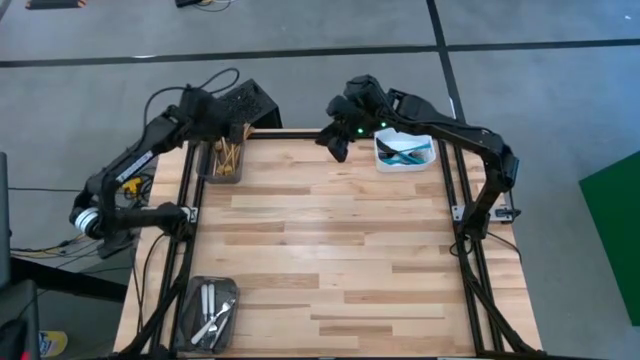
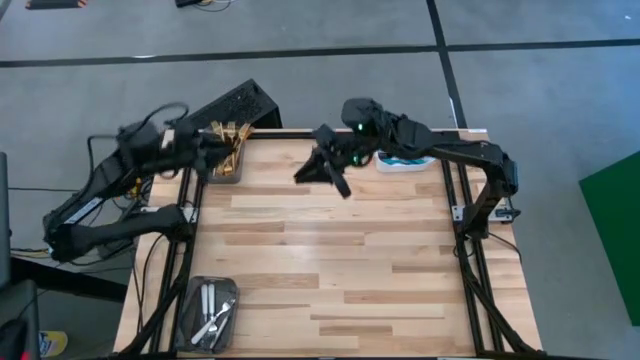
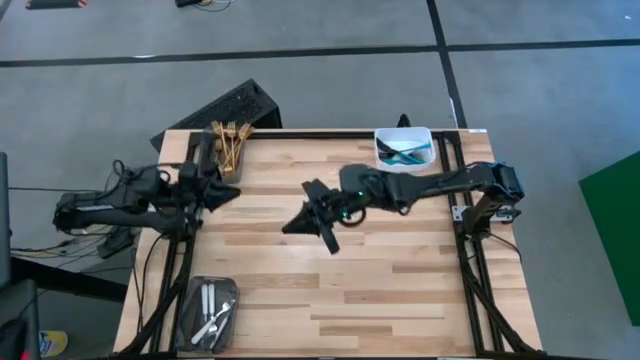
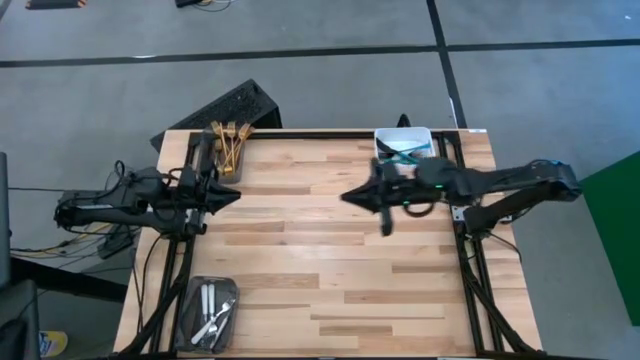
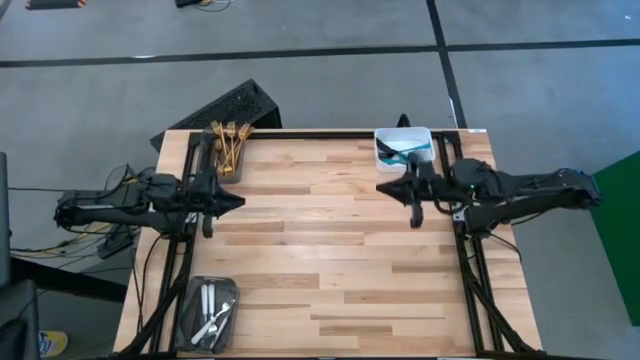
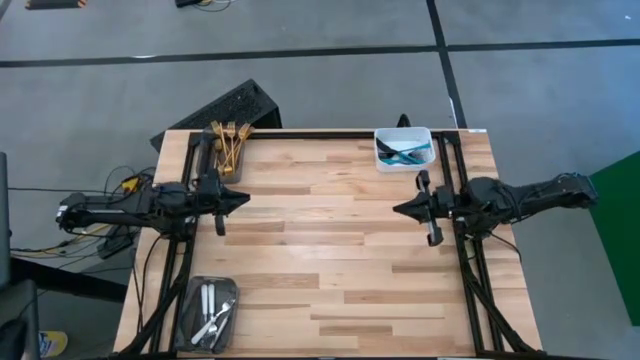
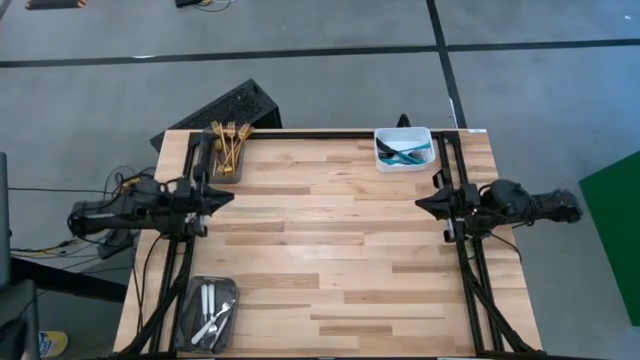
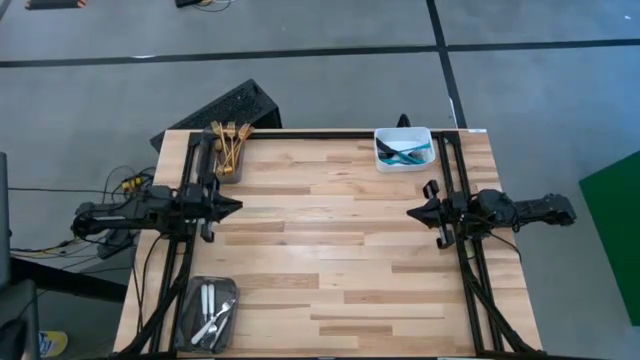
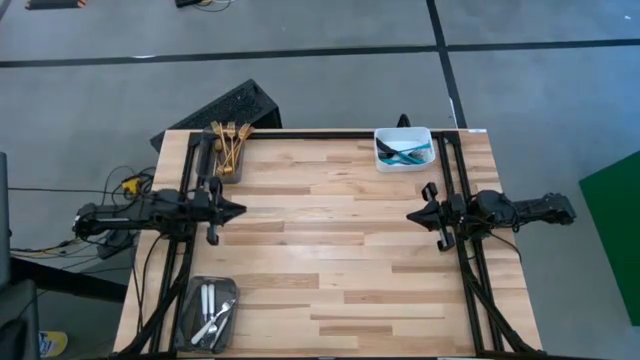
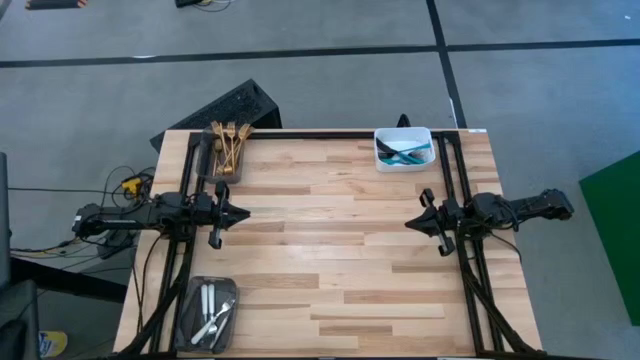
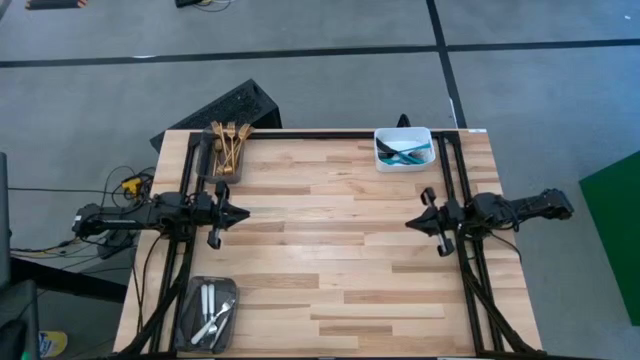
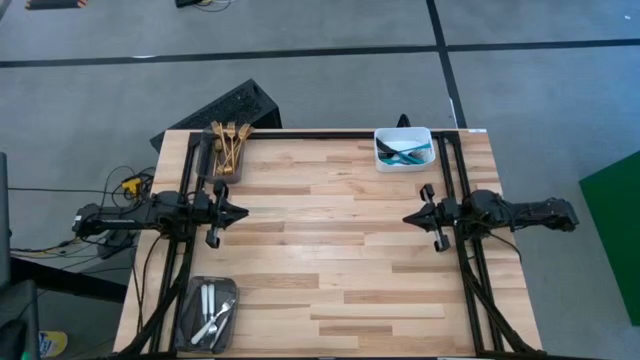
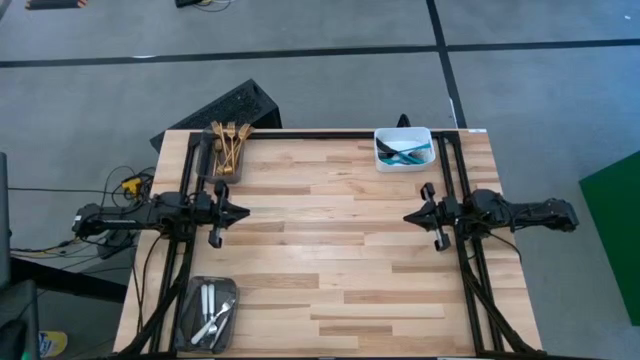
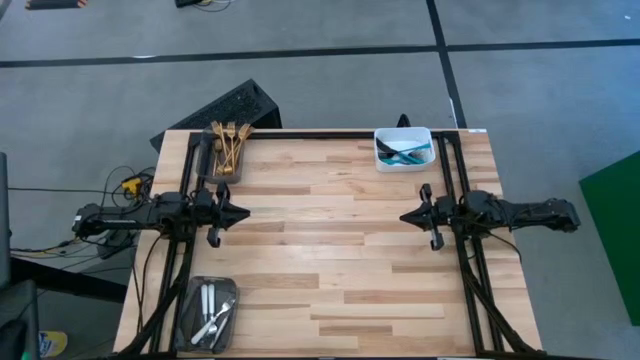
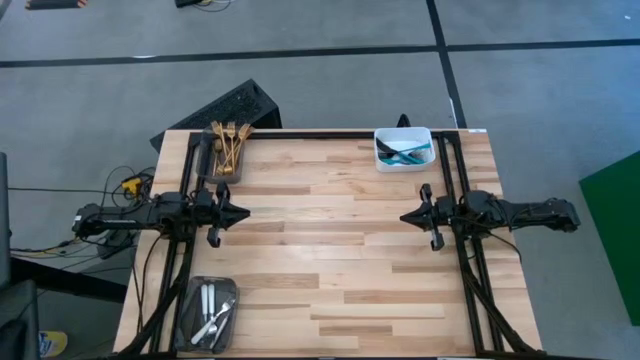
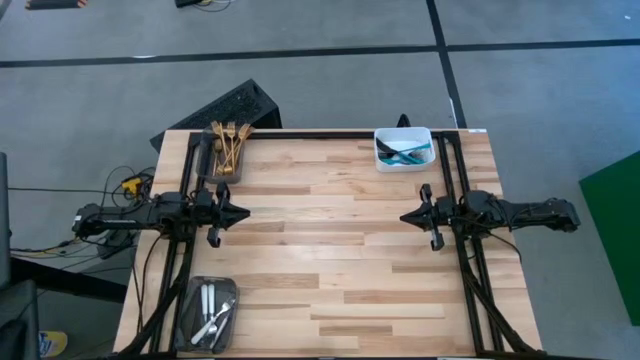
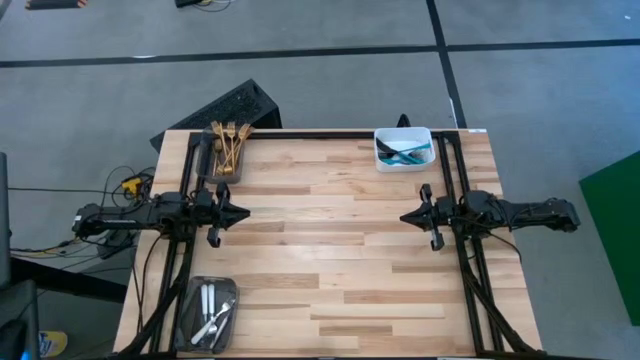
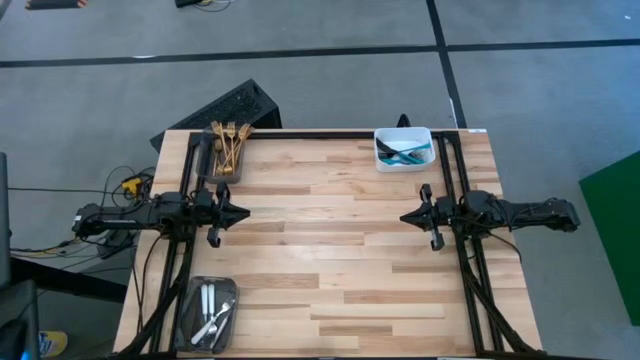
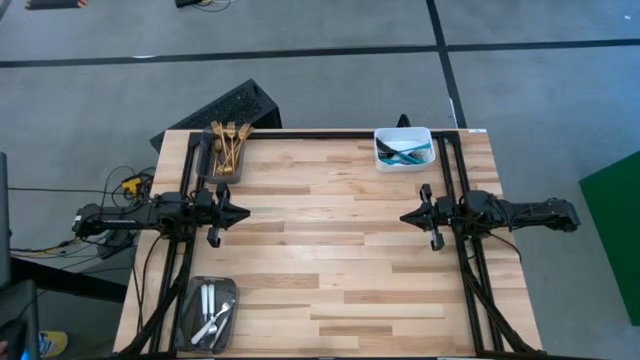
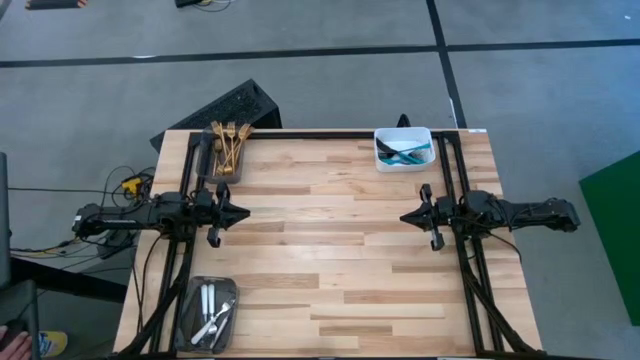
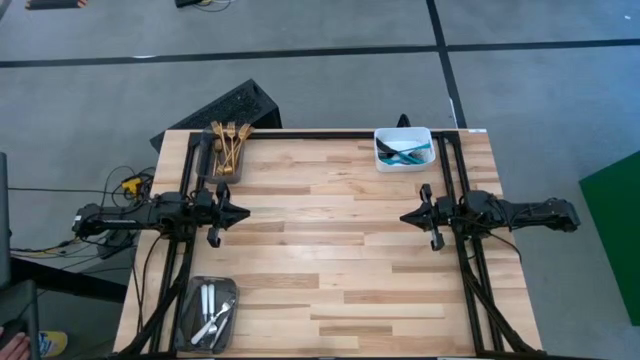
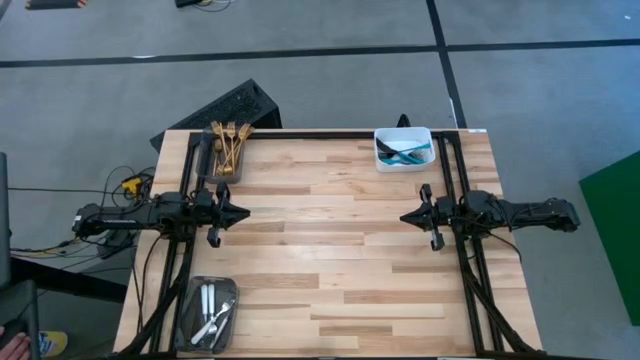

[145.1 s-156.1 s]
Task: Sort silverware by color (type)
Return to Home Position

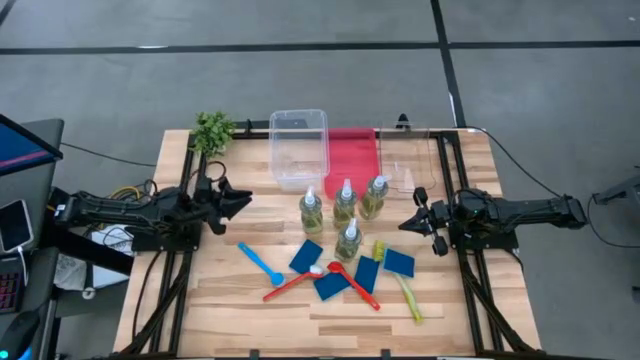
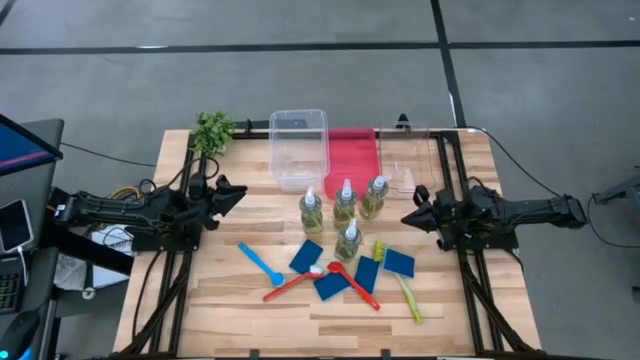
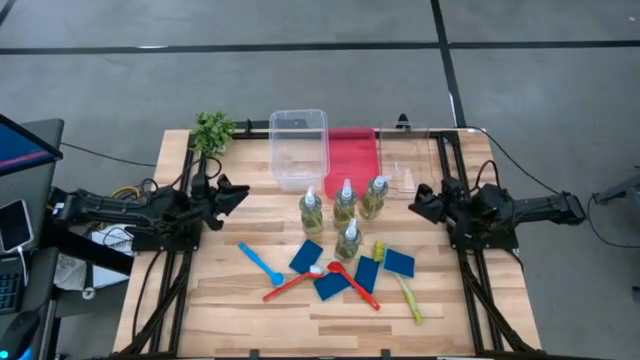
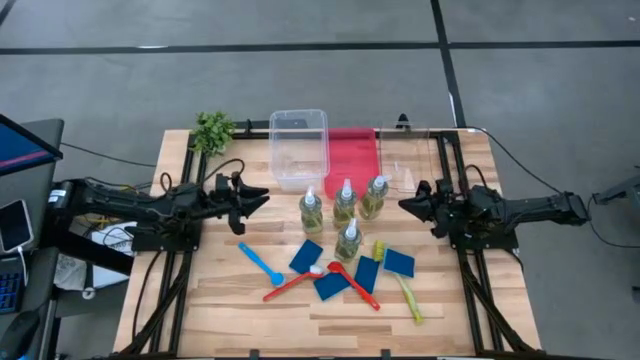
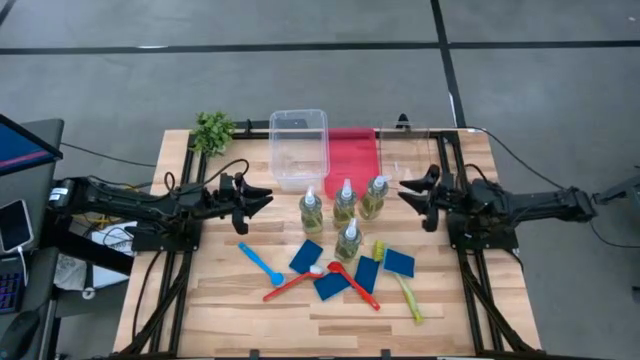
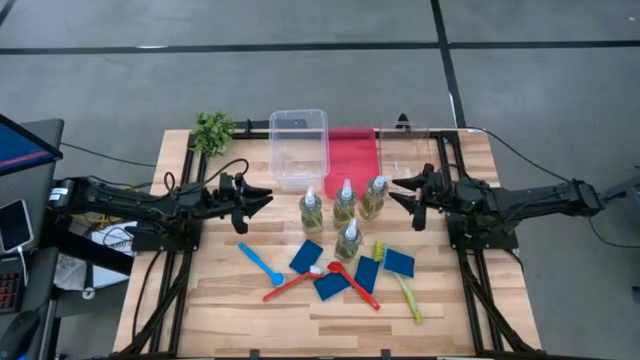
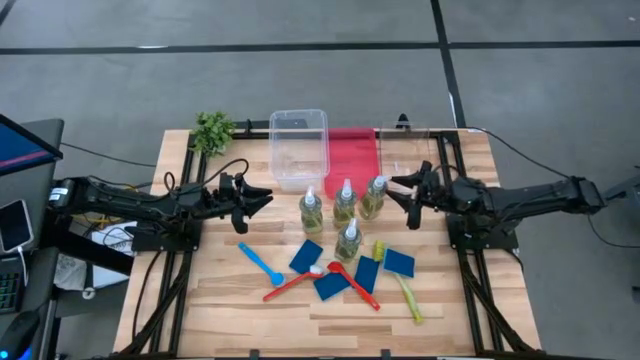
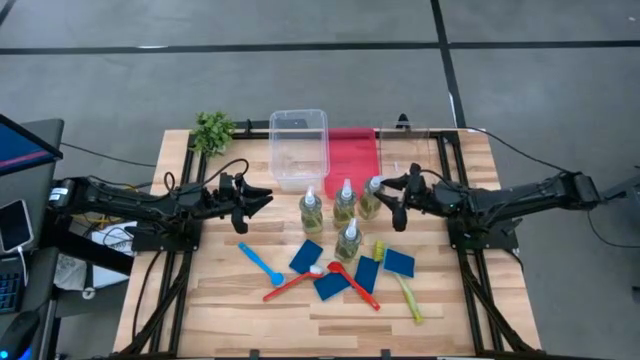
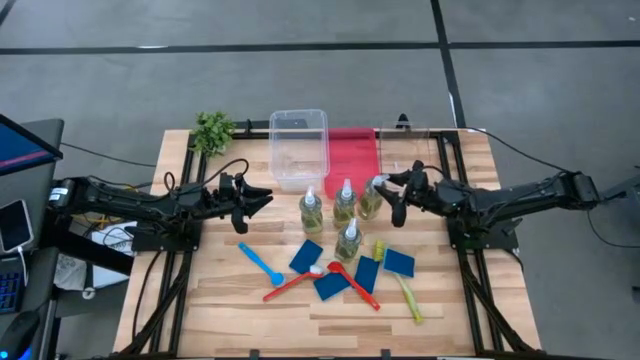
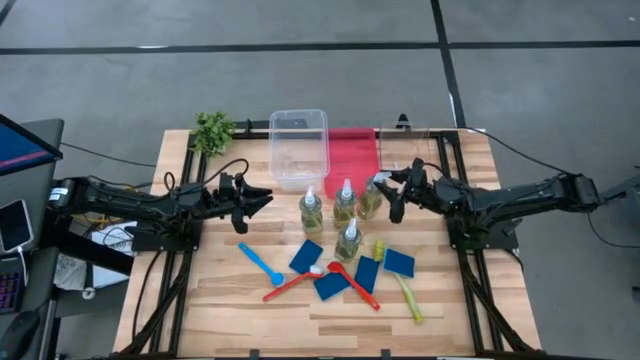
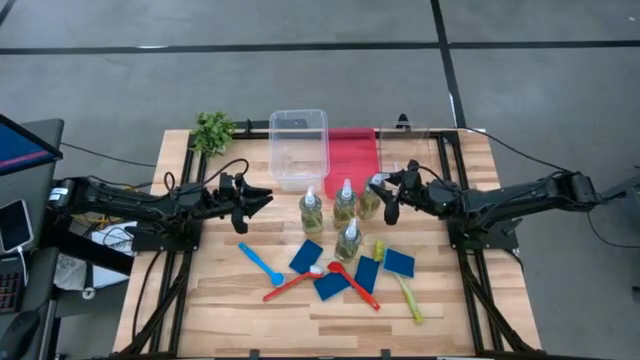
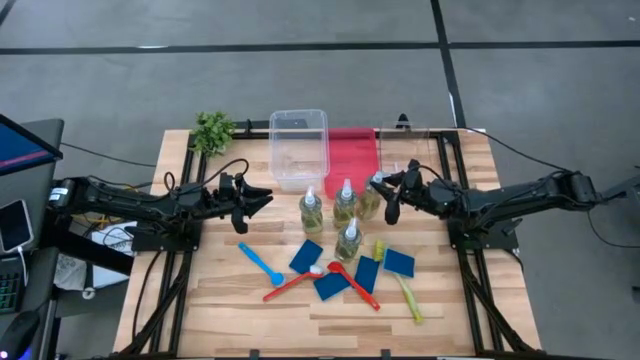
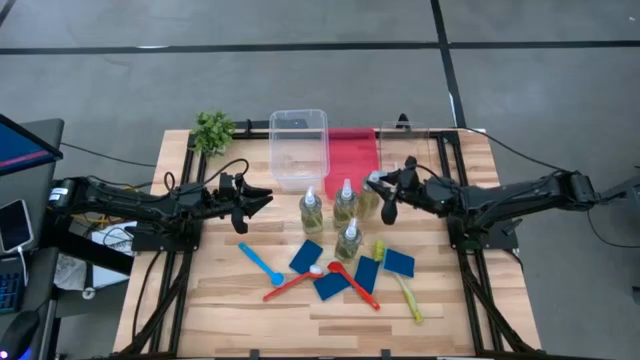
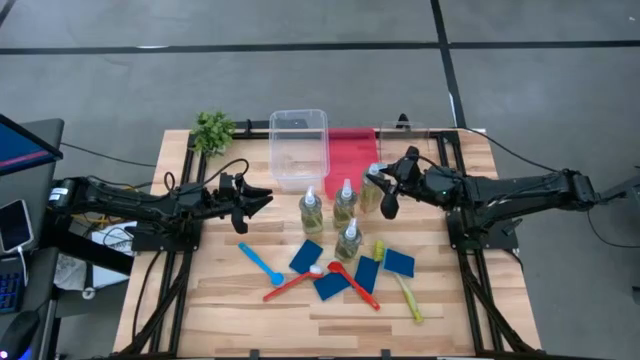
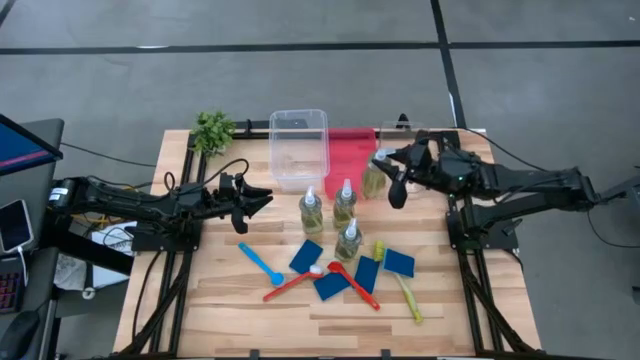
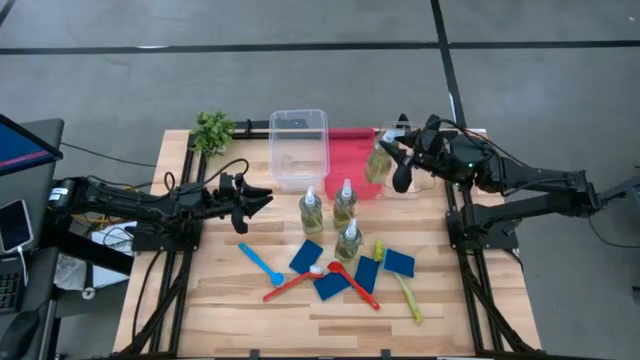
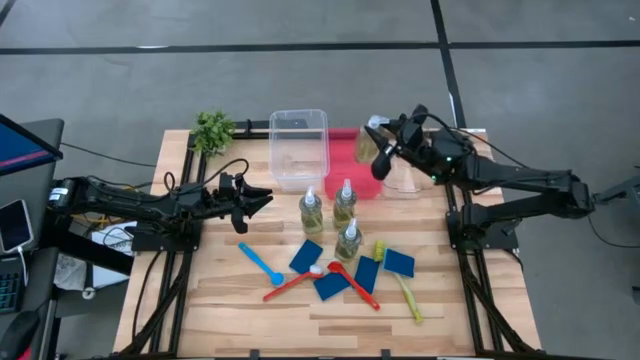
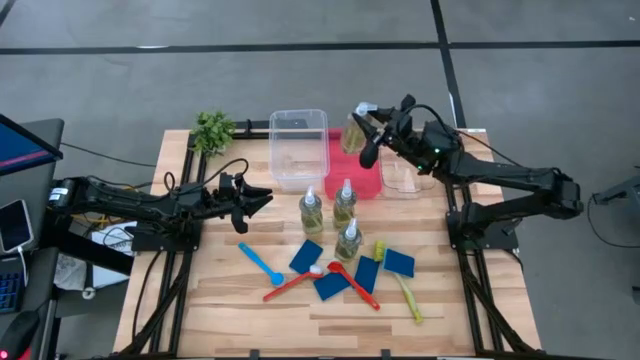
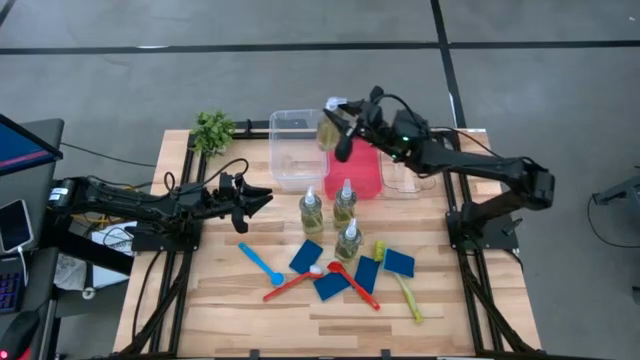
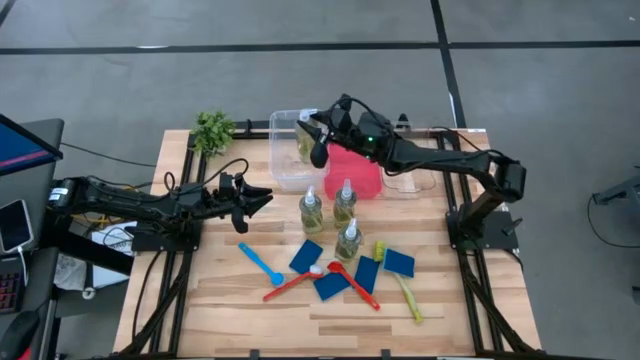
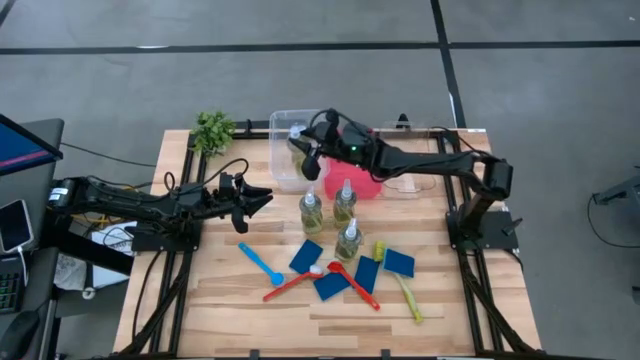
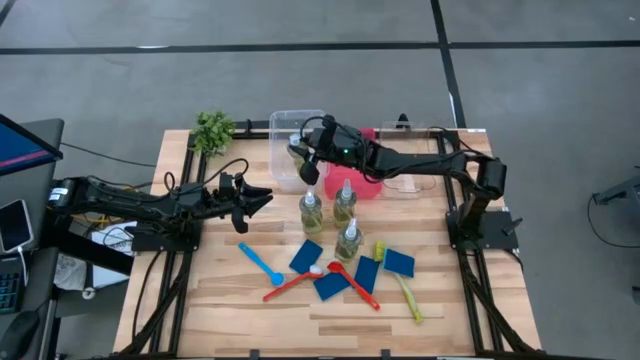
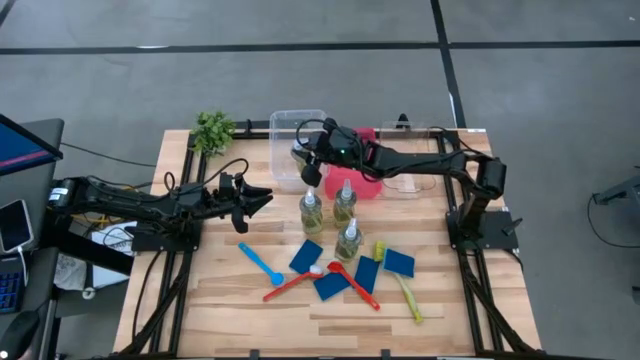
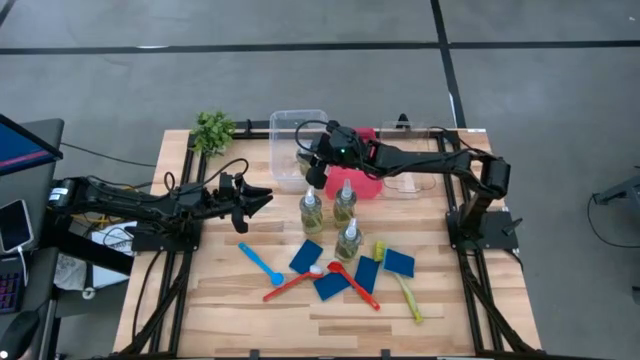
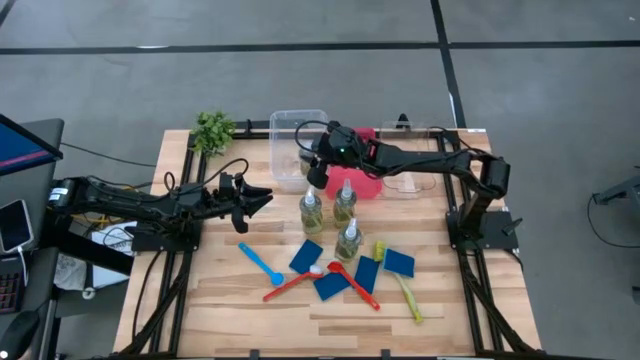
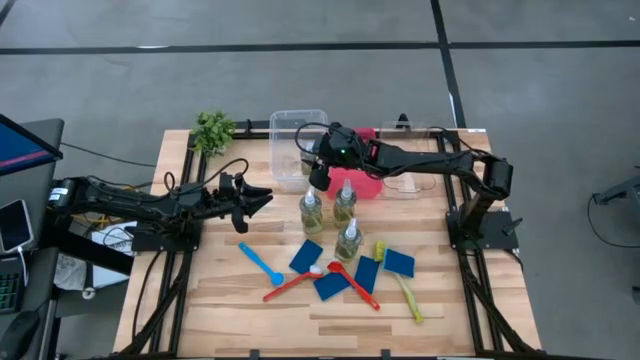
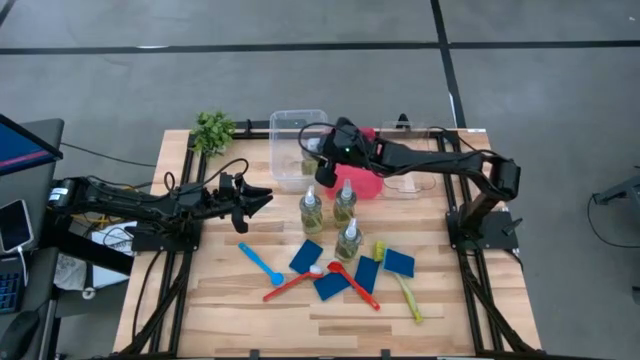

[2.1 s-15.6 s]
Task: Pick & Place Kitchen Sink Supplies
Put the transparent soap dispenser into the transparent container
